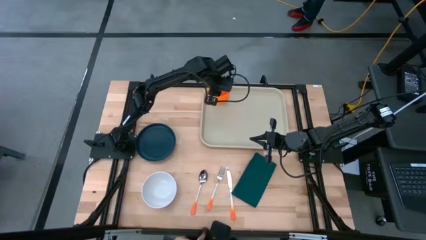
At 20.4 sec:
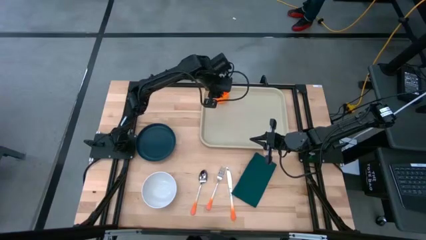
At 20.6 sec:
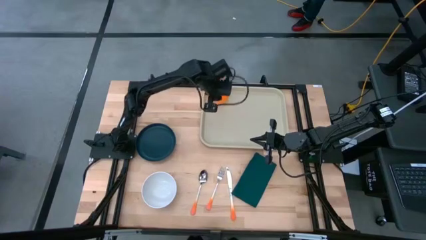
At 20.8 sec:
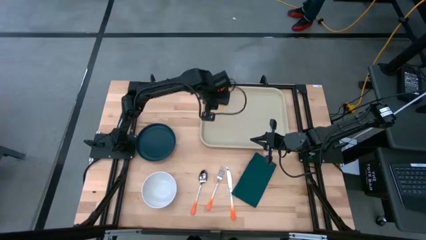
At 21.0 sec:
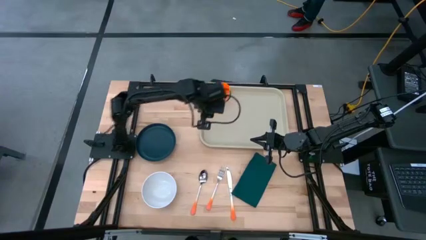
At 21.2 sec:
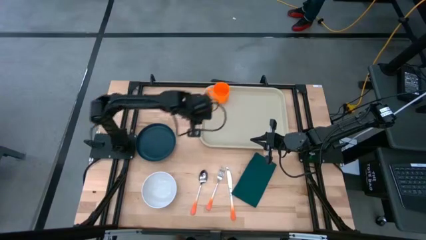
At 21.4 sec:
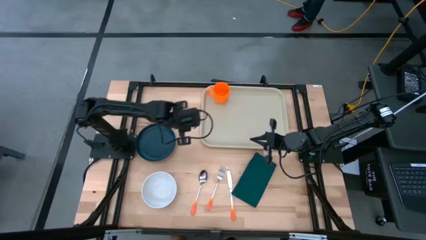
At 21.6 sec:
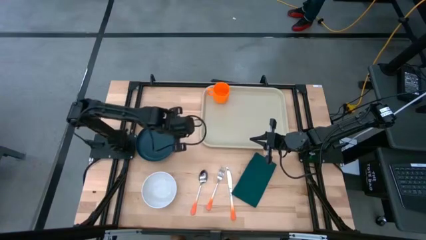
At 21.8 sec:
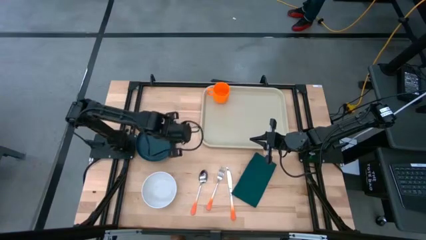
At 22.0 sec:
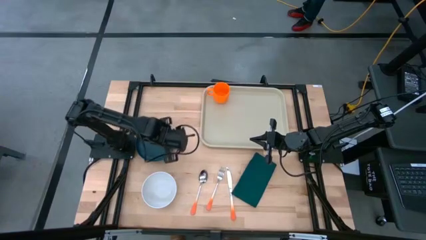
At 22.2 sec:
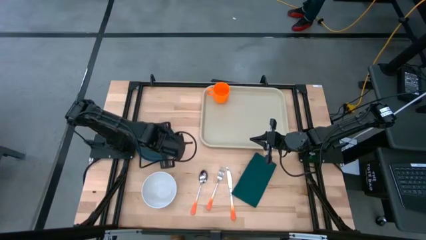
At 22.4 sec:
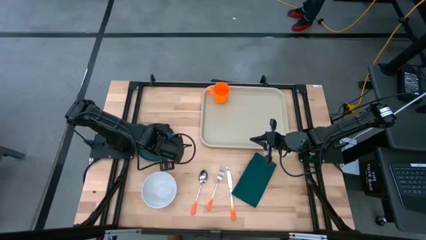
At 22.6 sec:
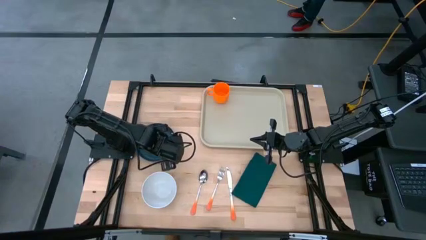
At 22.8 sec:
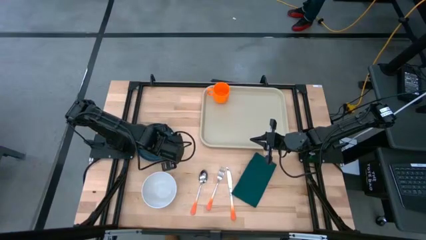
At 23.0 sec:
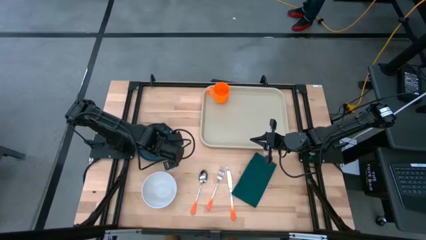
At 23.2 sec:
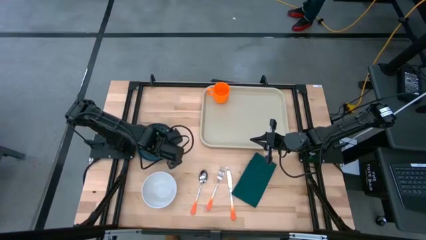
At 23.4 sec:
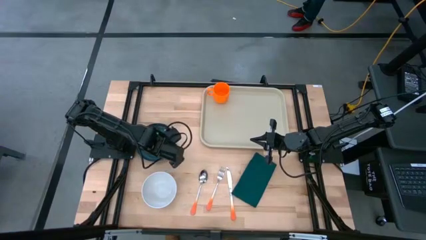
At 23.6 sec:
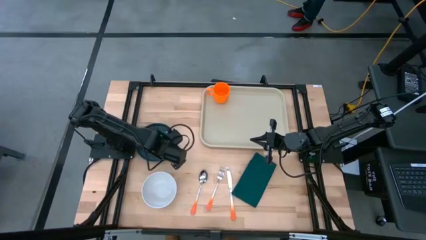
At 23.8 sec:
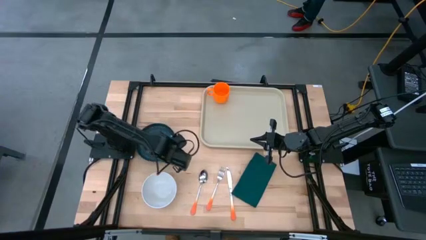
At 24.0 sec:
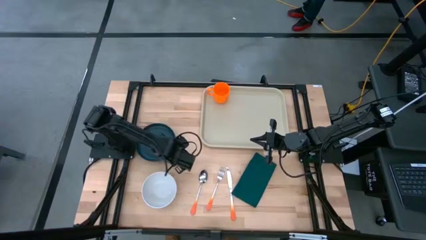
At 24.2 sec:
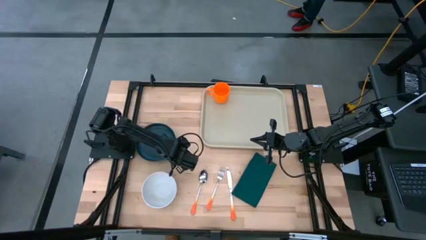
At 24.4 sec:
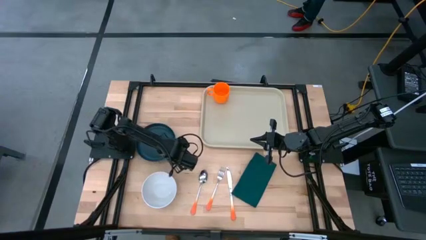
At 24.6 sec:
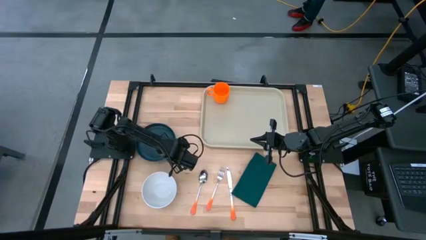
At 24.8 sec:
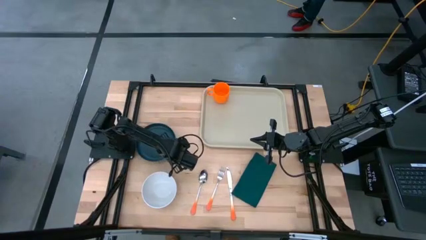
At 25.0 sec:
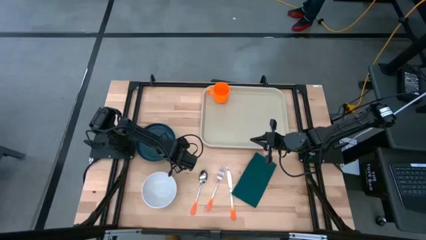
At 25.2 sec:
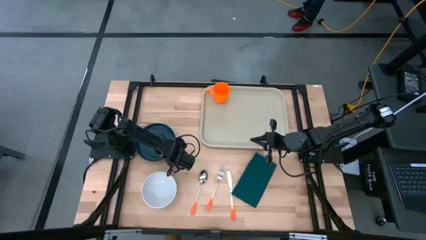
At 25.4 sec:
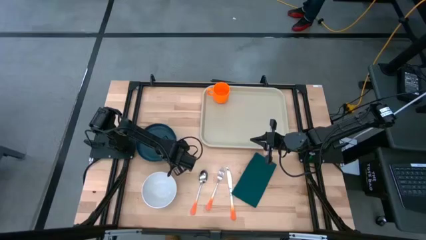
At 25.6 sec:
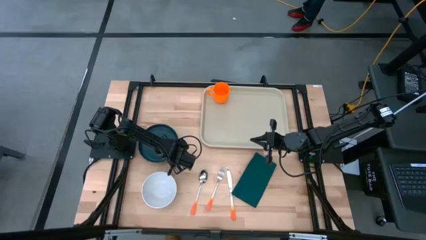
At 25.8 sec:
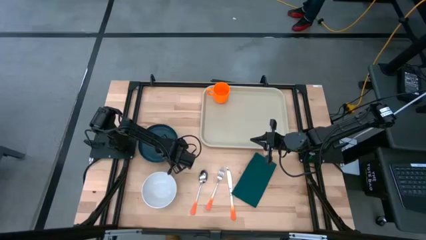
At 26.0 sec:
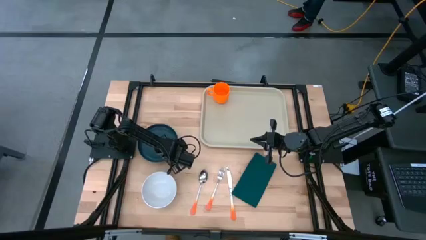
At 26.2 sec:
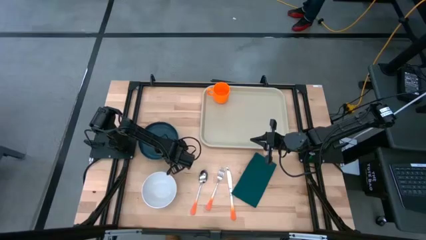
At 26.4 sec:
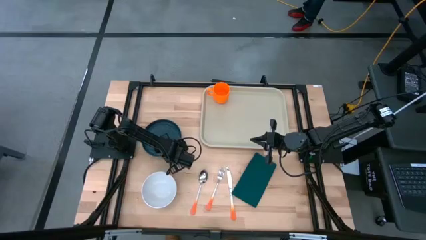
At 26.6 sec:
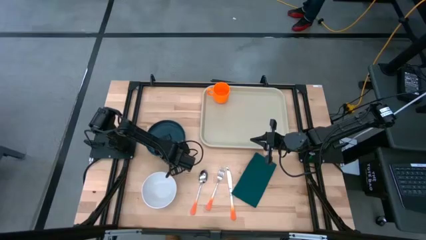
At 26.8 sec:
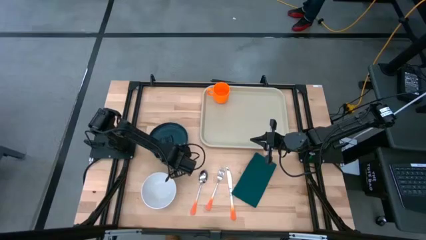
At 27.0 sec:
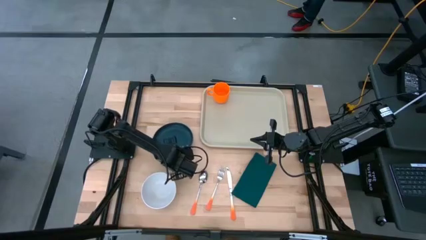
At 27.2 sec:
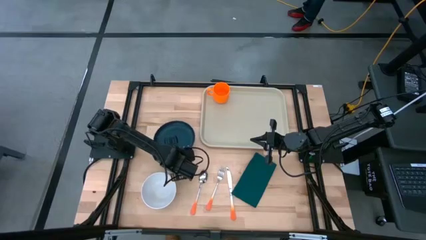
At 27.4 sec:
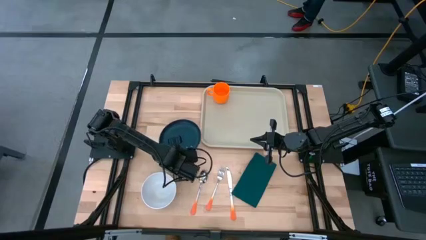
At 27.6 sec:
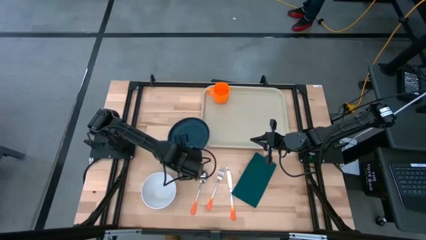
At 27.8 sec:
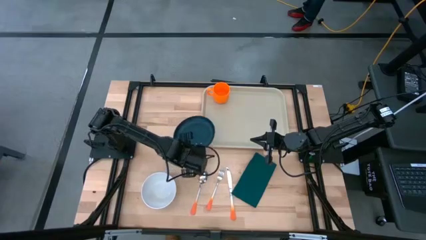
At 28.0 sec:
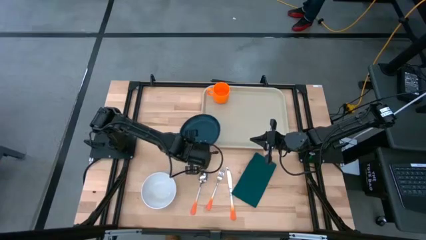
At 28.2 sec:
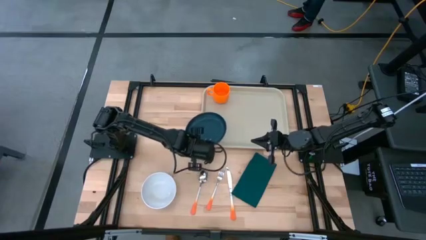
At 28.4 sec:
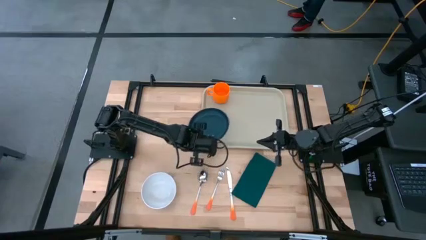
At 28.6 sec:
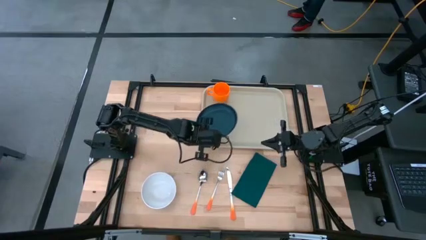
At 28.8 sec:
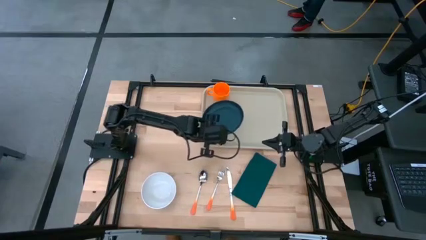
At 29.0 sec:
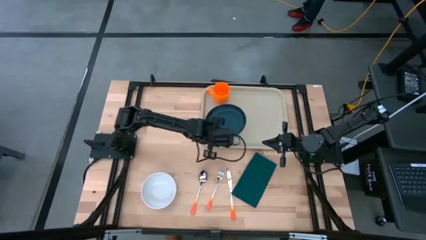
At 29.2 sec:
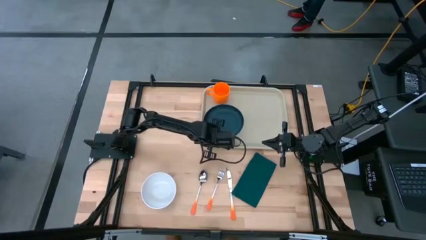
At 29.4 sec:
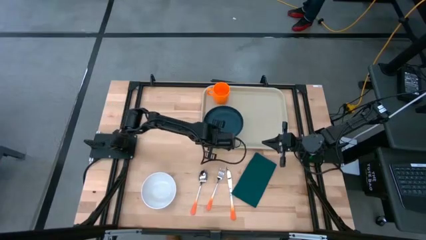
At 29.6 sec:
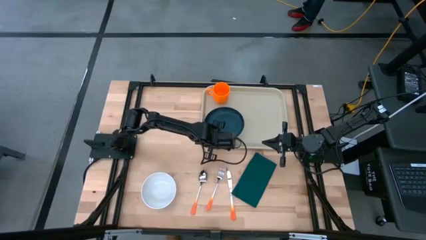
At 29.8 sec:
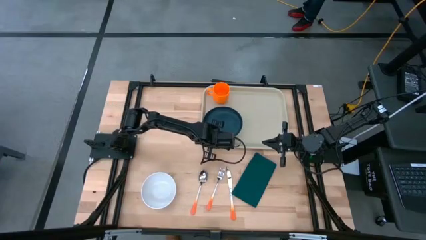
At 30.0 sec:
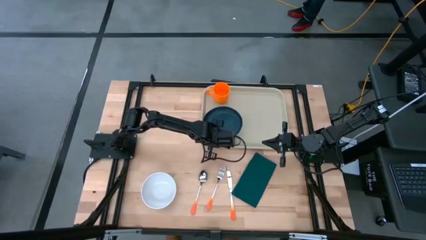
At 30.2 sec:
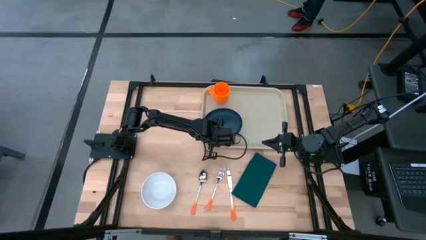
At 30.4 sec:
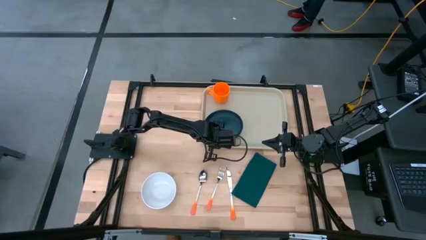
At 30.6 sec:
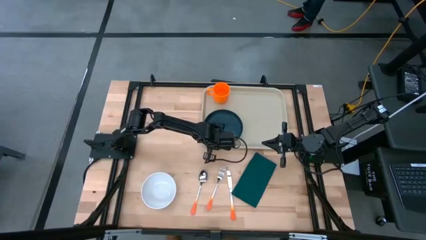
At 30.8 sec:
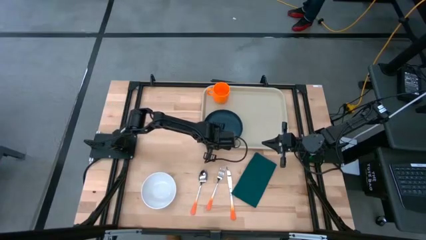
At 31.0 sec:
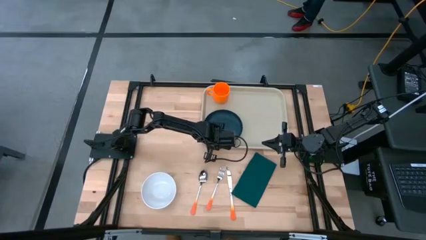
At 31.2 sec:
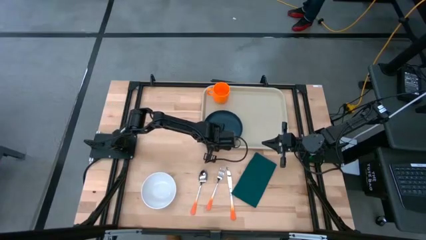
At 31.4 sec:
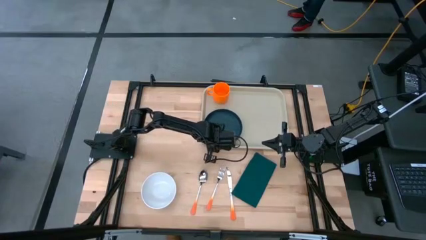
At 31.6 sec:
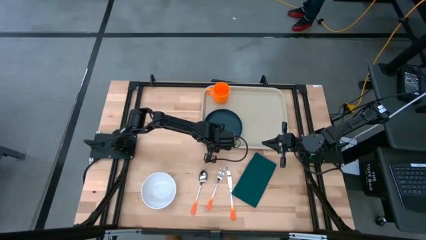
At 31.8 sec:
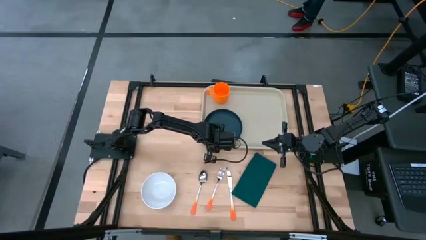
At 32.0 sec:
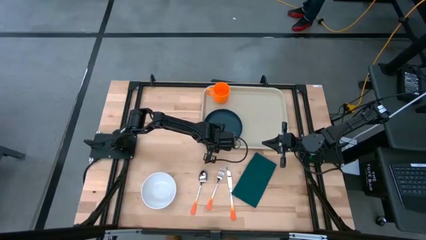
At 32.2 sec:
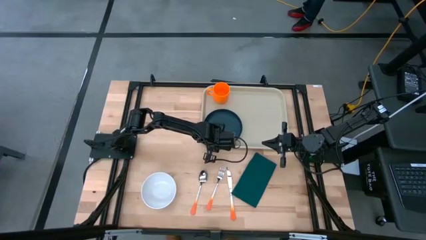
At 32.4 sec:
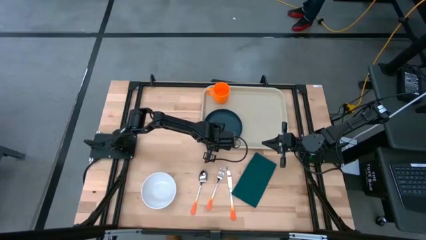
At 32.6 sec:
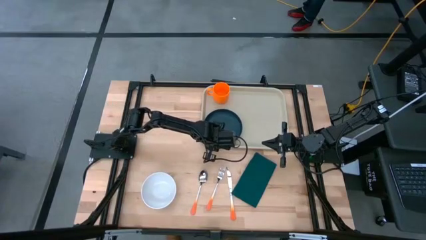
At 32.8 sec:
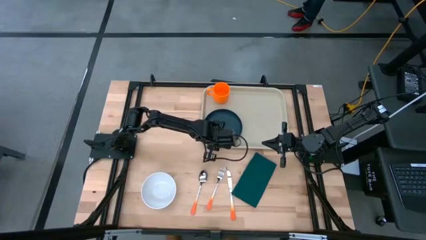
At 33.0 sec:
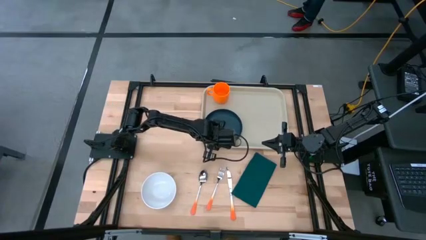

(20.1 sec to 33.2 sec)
Task: Set up tray
Put the blue plate at the bottom of the orange cup on the serving tray

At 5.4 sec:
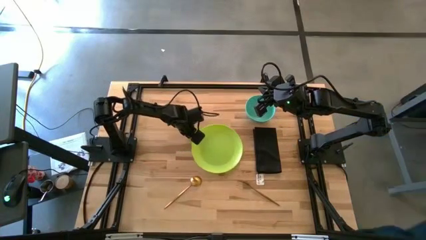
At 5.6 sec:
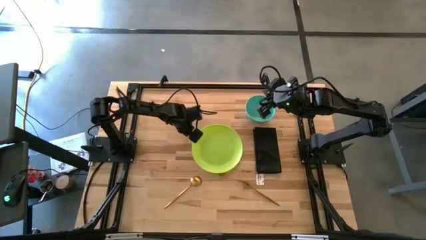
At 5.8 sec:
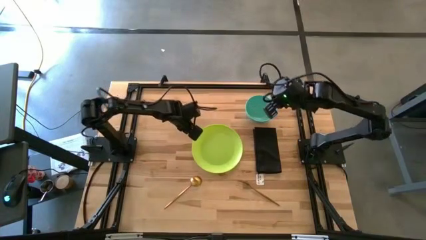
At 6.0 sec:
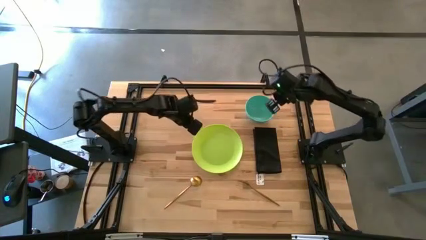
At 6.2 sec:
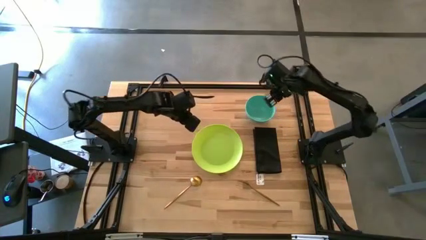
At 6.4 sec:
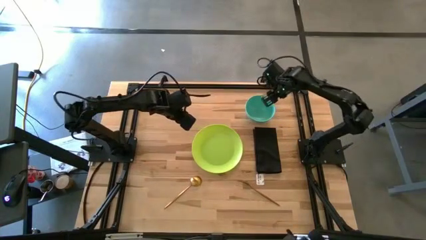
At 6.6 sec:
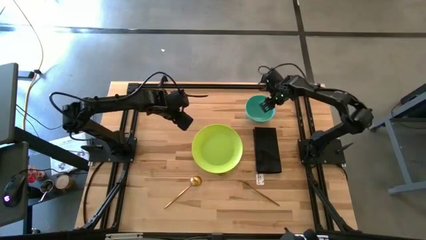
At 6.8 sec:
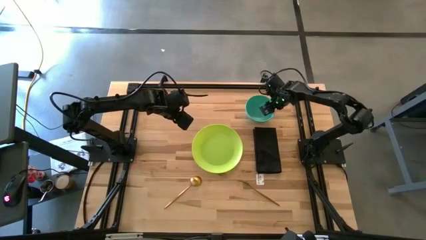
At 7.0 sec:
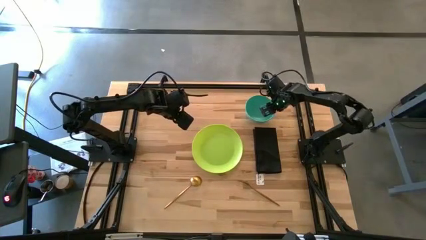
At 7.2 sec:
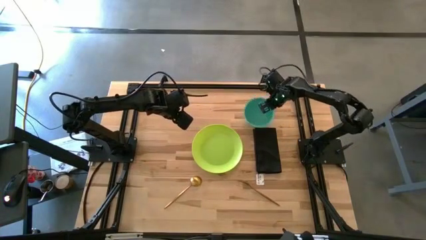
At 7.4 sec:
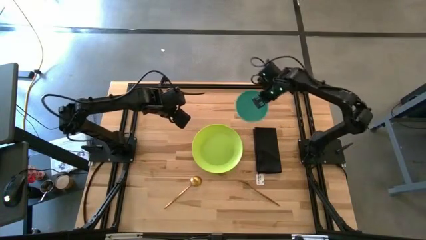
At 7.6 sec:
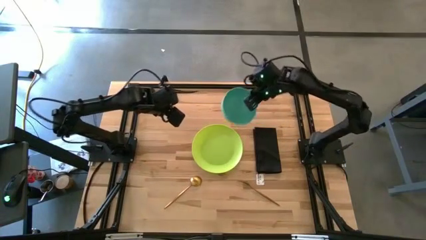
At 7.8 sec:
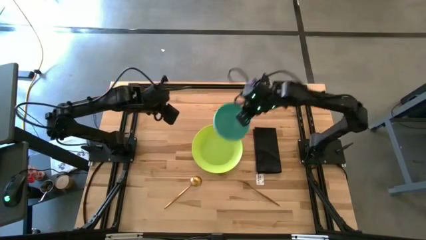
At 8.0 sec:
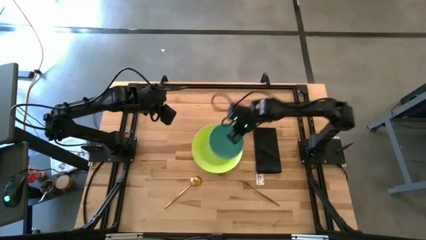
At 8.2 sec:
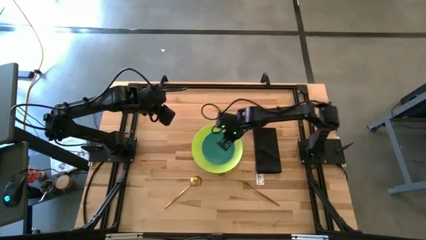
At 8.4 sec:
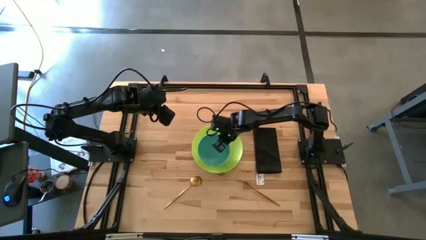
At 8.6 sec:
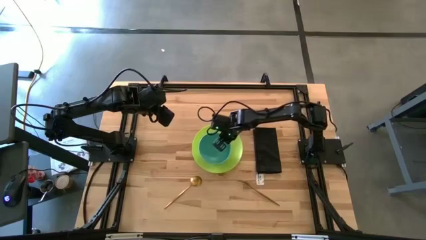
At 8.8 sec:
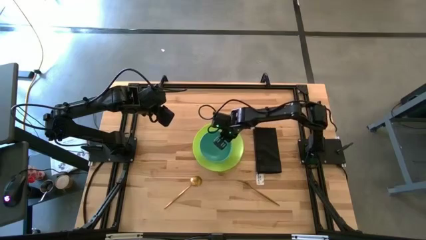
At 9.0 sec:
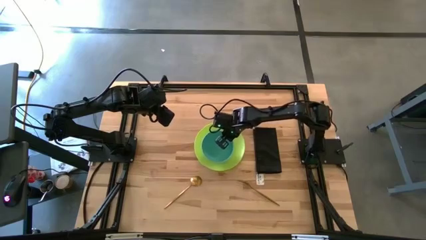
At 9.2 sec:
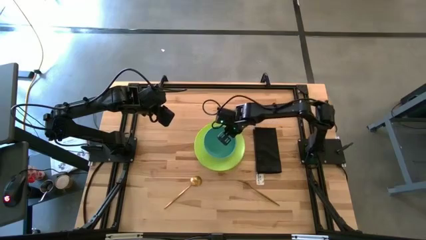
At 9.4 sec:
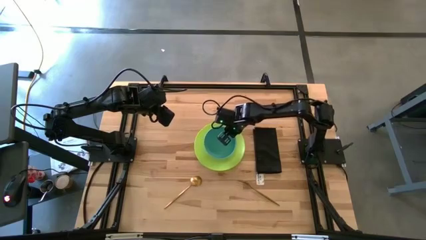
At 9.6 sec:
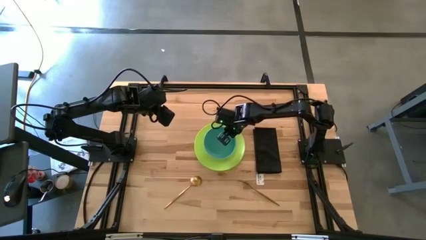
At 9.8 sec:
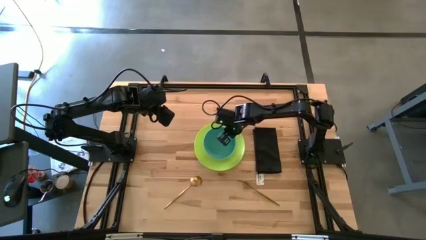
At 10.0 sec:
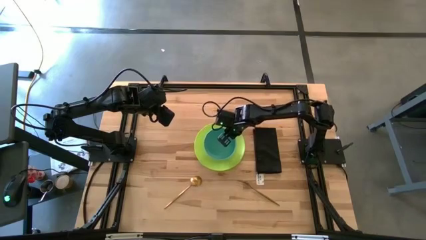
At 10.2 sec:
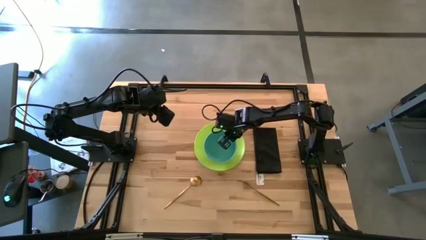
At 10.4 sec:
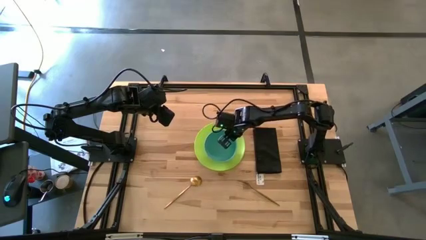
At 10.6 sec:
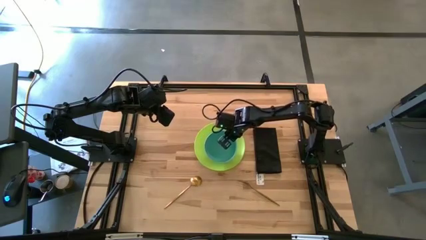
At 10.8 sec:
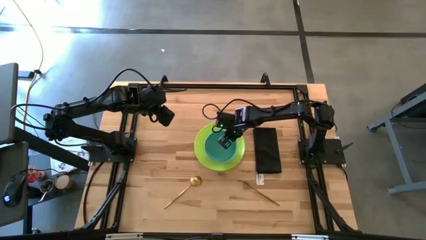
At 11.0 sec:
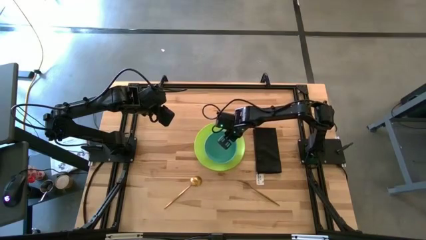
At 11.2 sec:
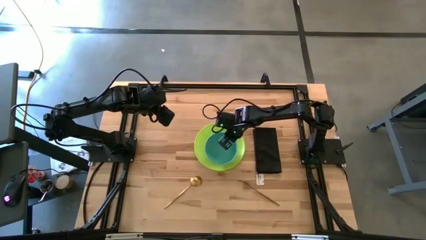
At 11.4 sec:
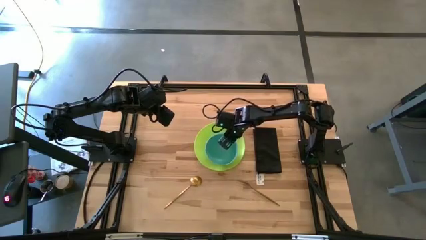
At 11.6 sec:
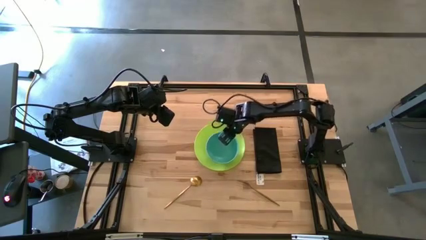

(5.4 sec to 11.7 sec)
Task: Set table place
Put the blue bowl on top of the plate
